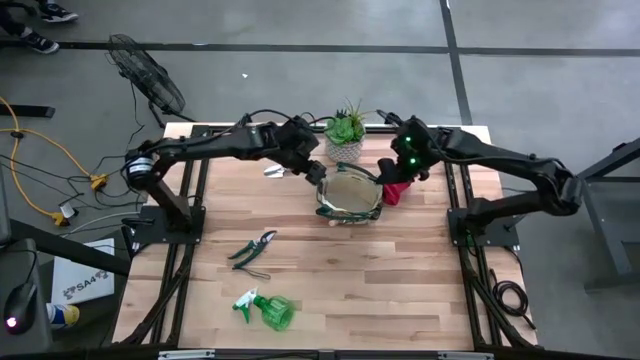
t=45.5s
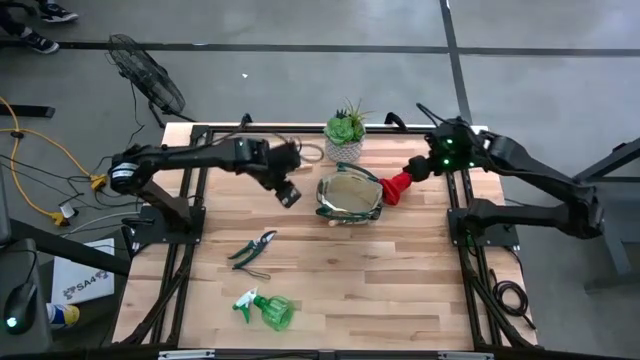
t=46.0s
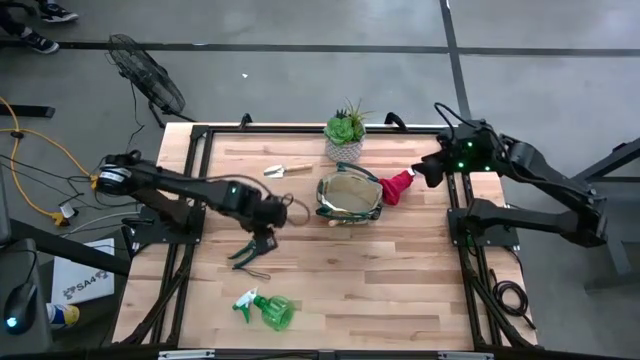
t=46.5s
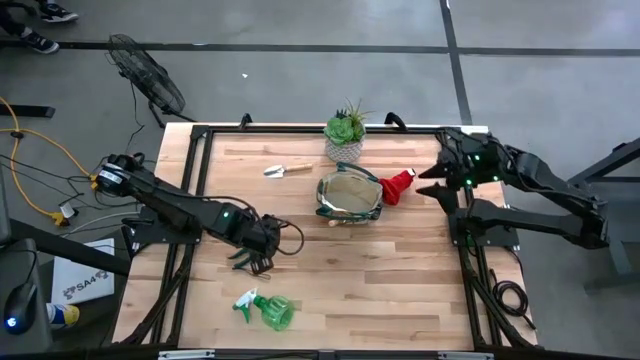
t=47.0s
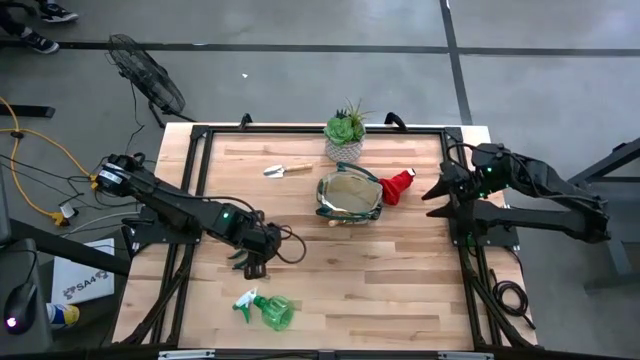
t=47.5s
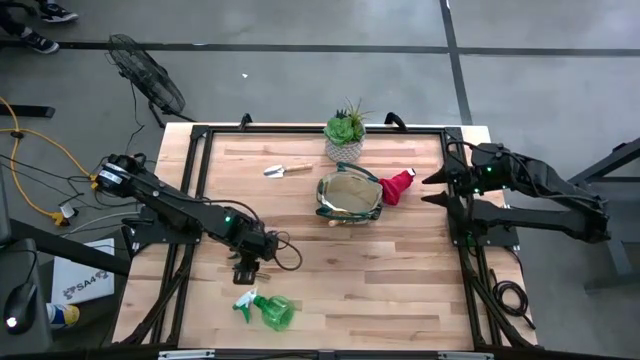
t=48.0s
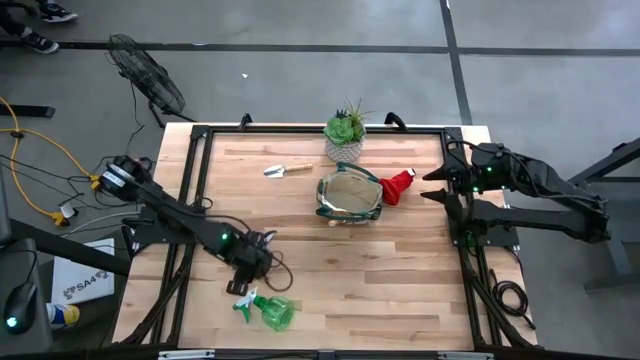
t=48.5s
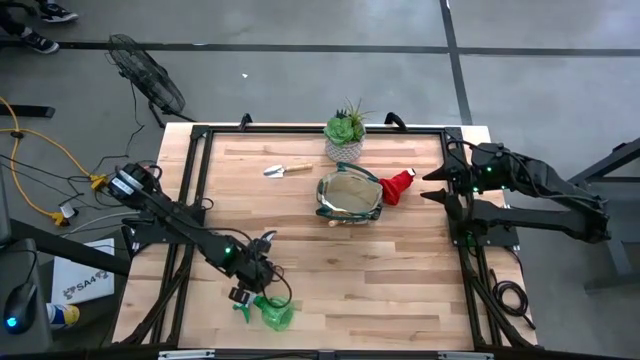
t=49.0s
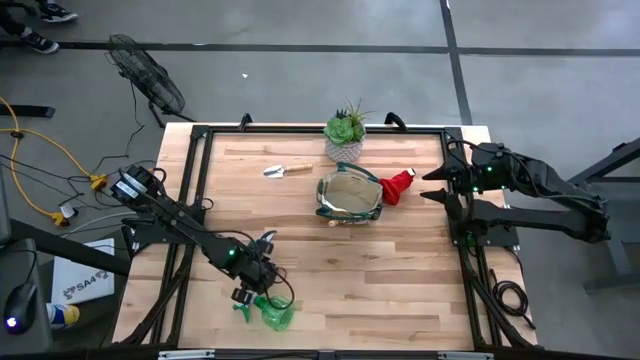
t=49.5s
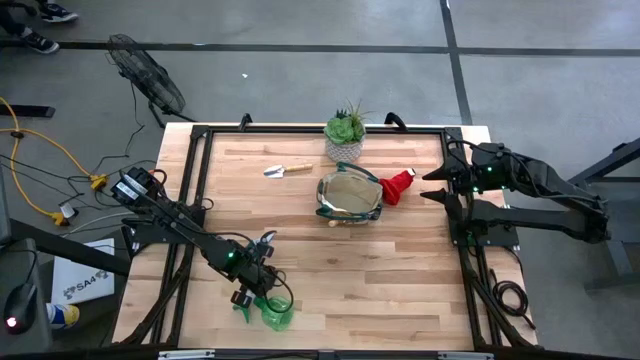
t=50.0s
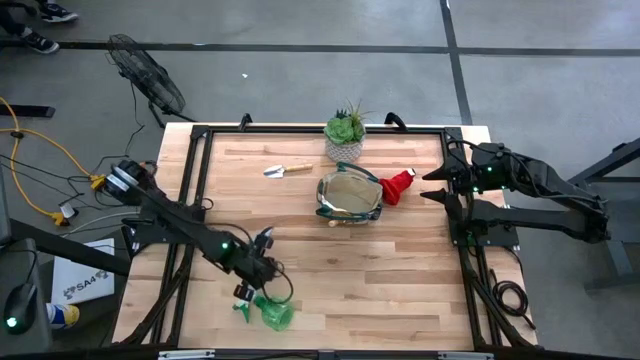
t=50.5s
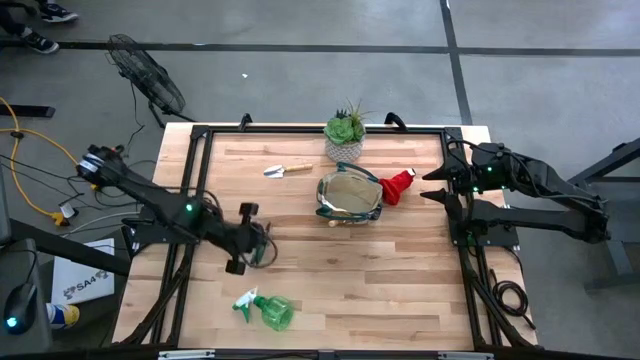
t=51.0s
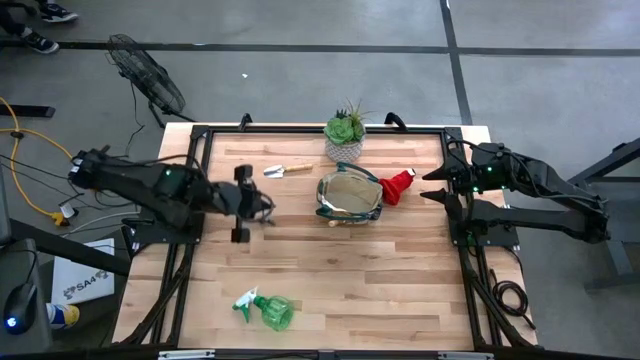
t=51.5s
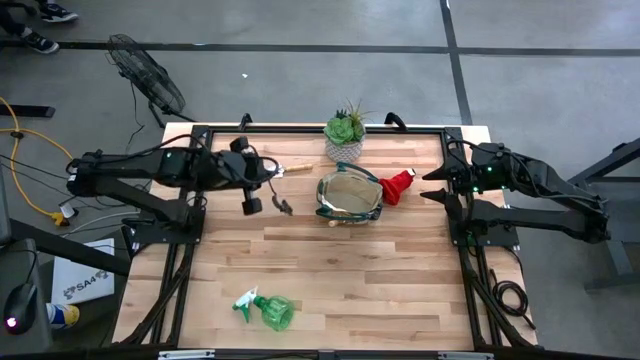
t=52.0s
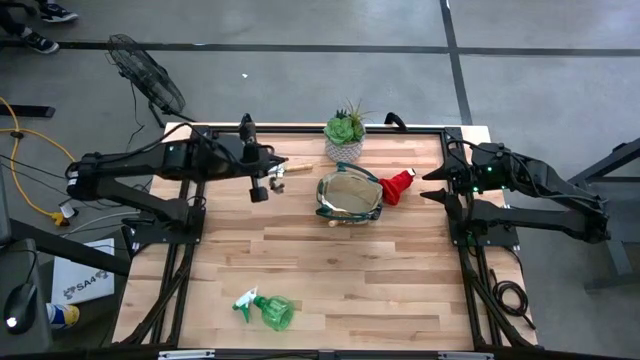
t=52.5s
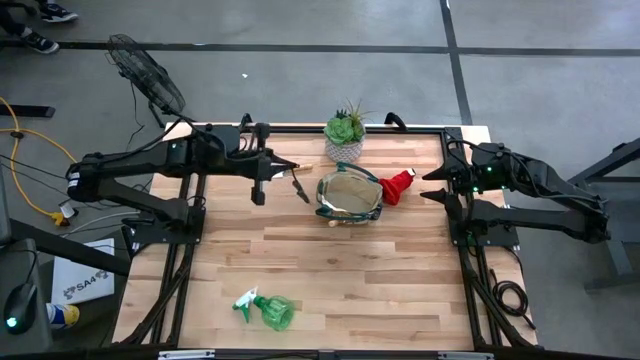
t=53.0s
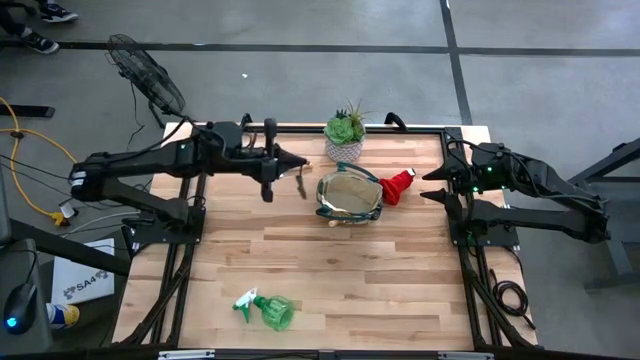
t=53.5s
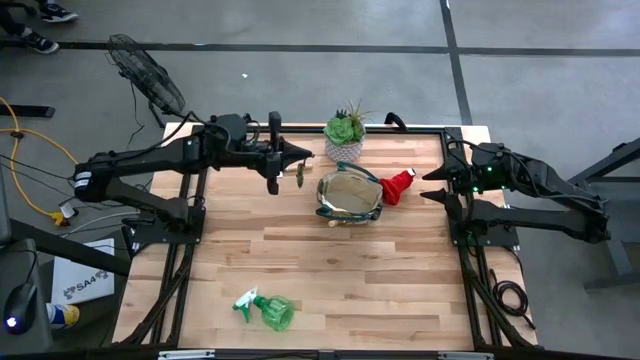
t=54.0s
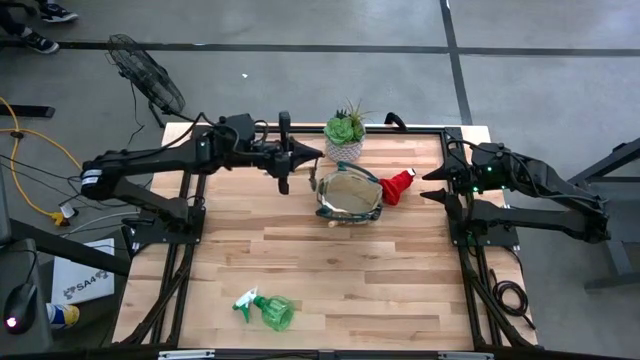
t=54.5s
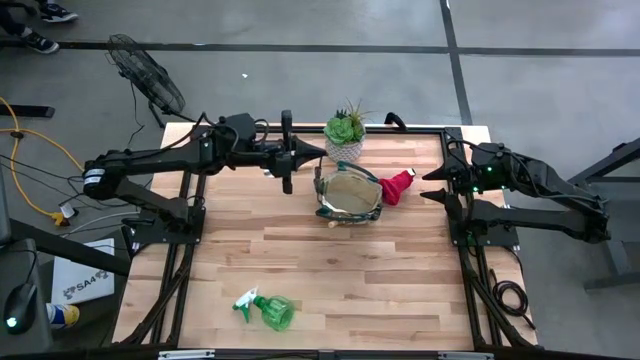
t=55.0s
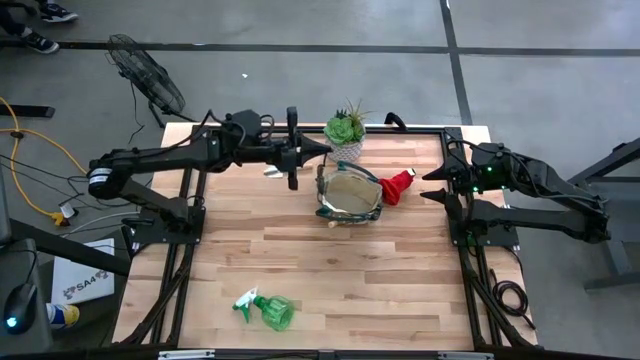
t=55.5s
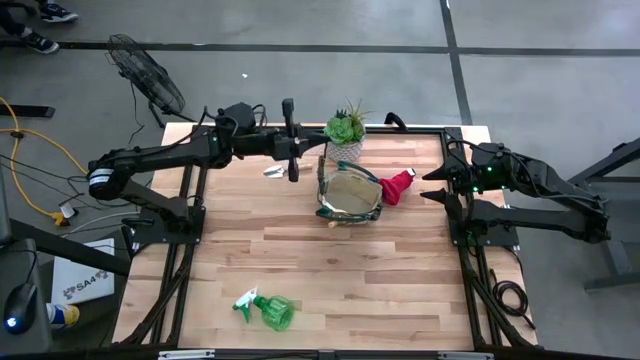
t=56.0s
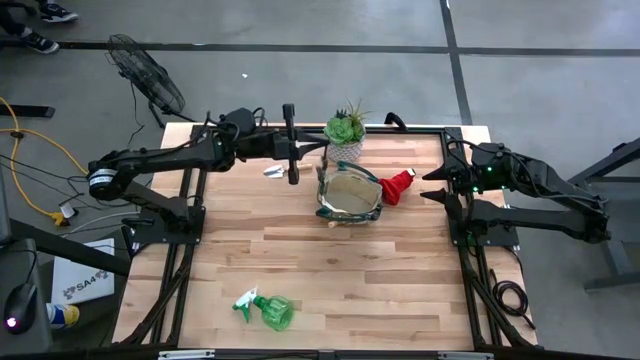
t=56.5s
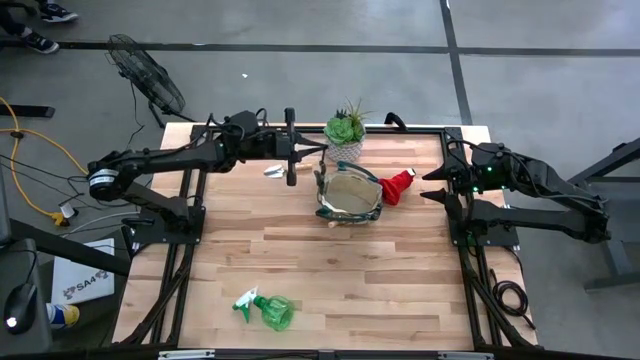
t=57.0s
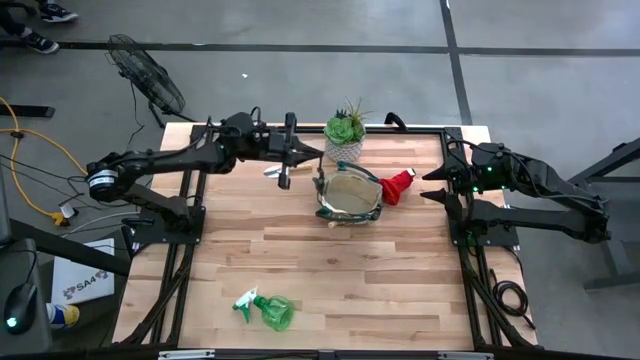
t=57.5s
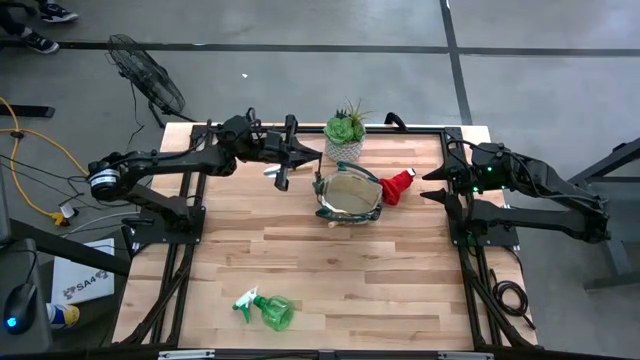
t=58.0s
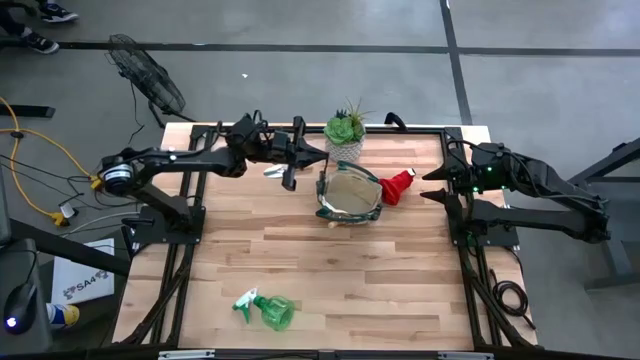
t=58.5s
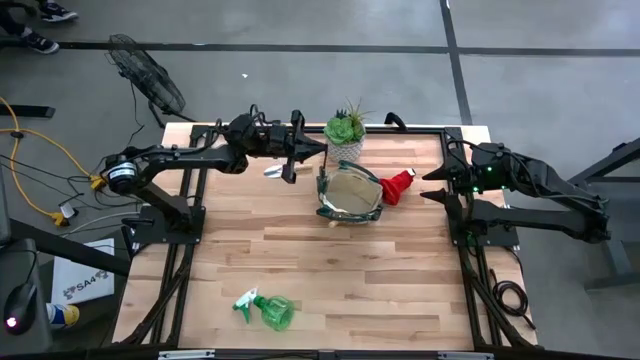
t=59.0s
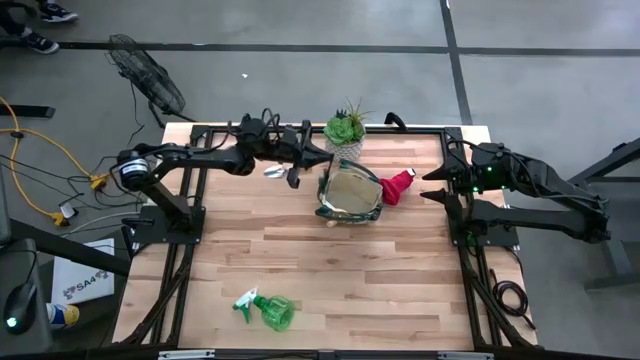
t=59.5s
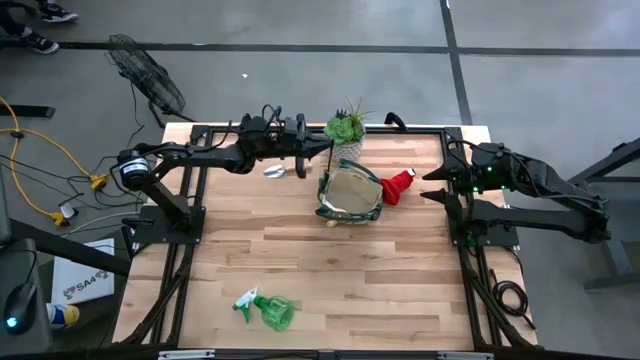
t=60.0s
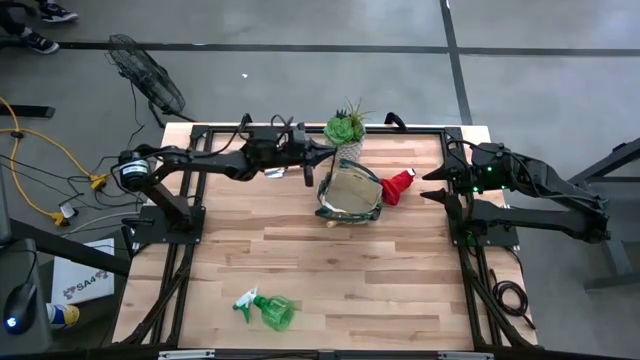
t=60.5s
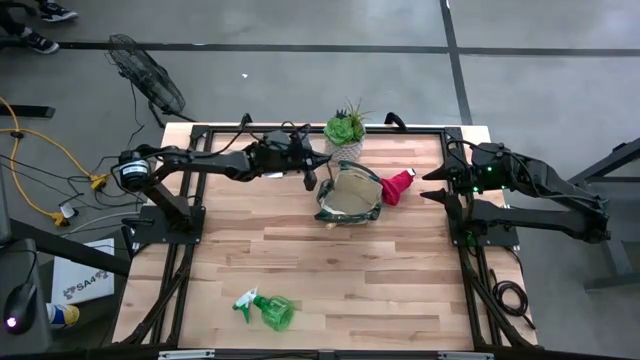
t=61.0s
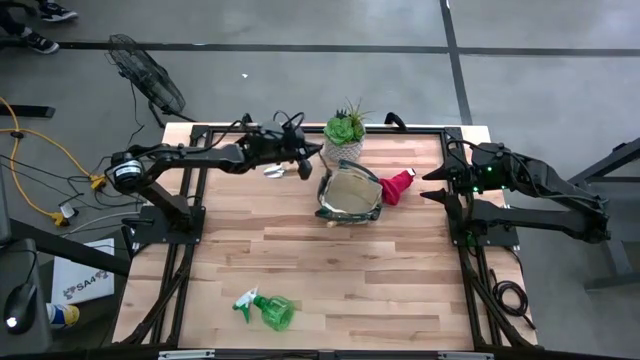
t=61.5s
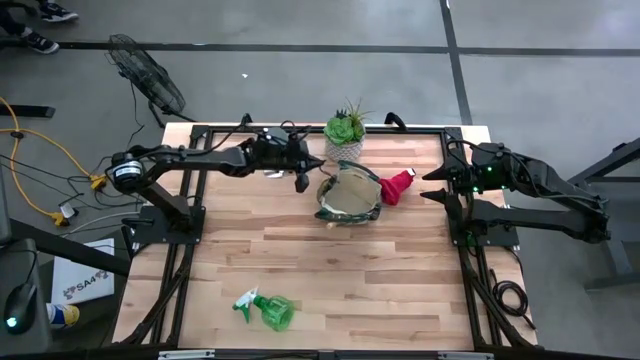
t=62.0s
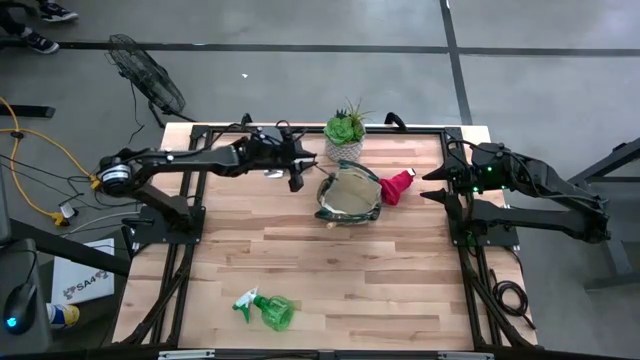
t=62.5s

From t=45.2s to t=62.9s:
Task: Pick & Place Garden tools in Gardening bag
Put the green shear scissors into the brown gardening bag

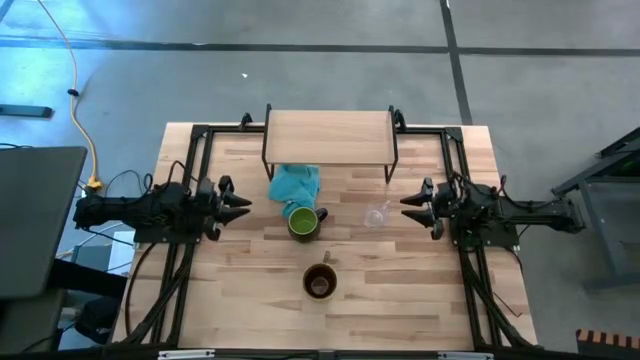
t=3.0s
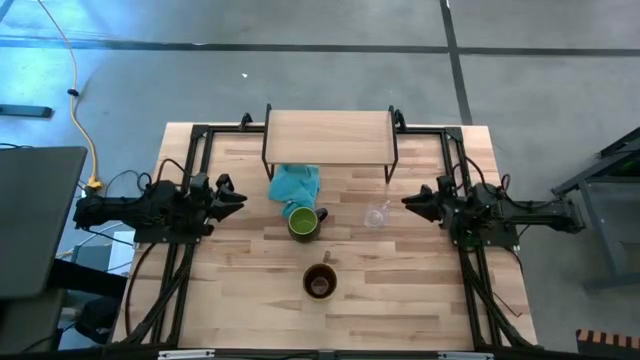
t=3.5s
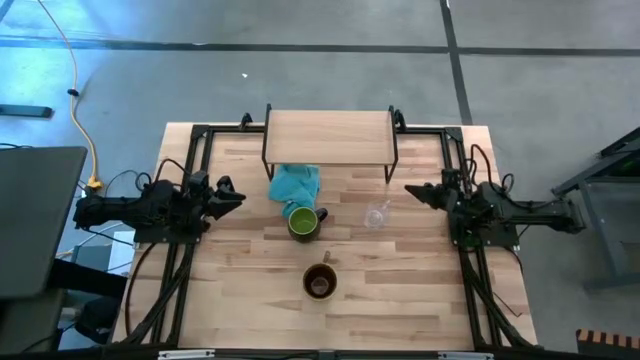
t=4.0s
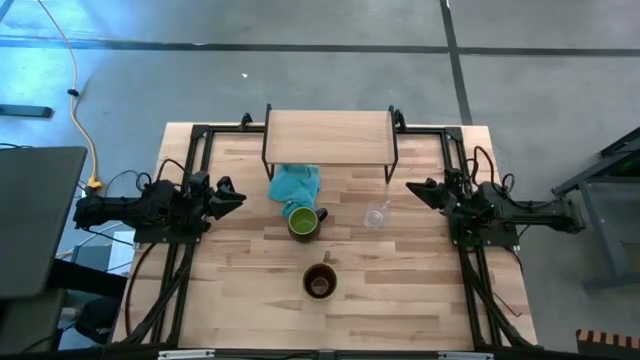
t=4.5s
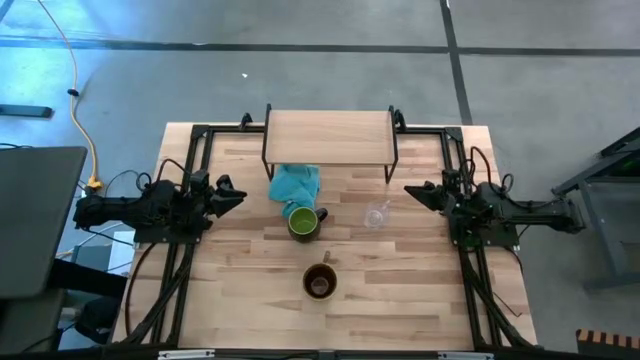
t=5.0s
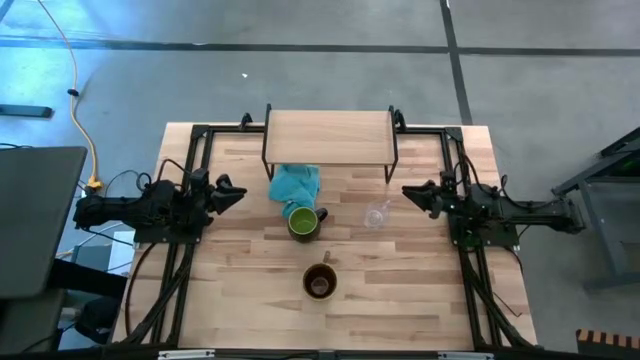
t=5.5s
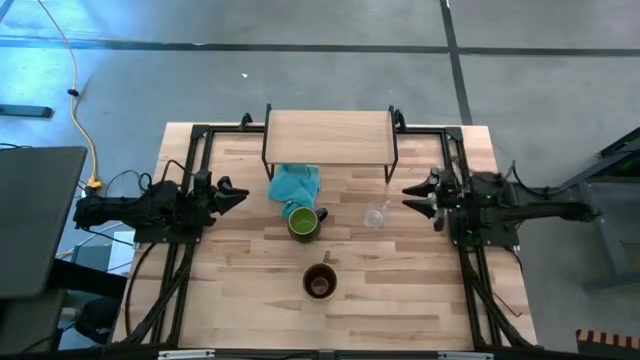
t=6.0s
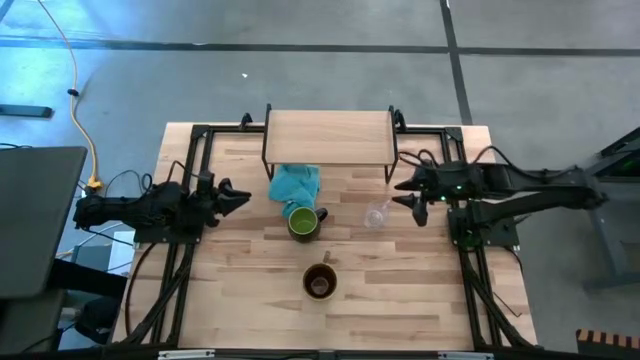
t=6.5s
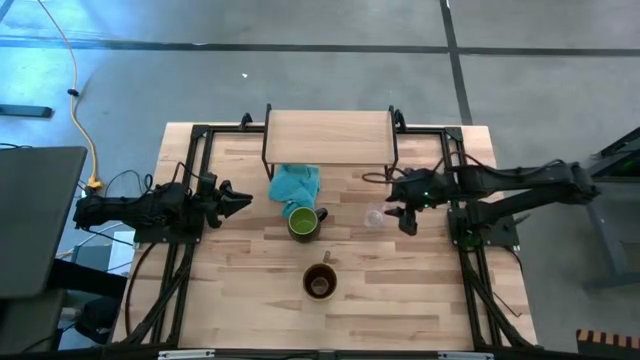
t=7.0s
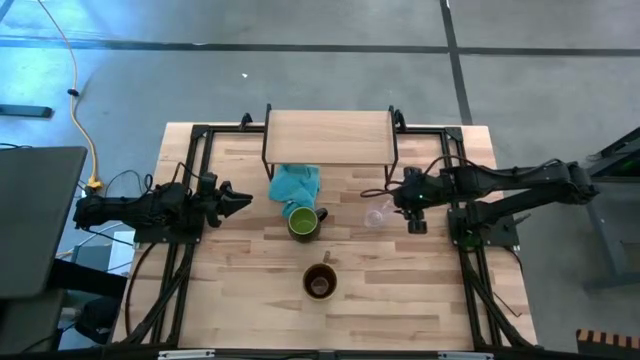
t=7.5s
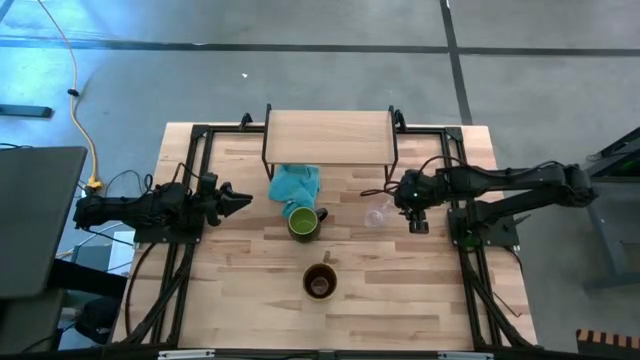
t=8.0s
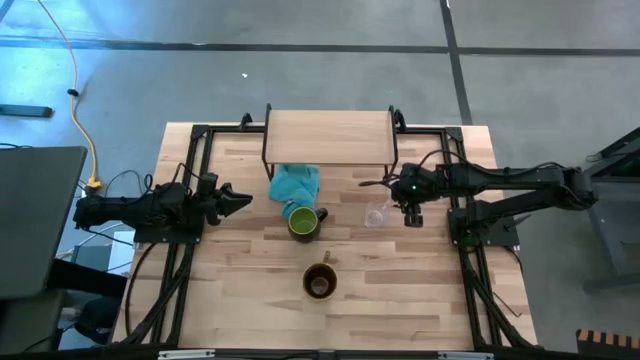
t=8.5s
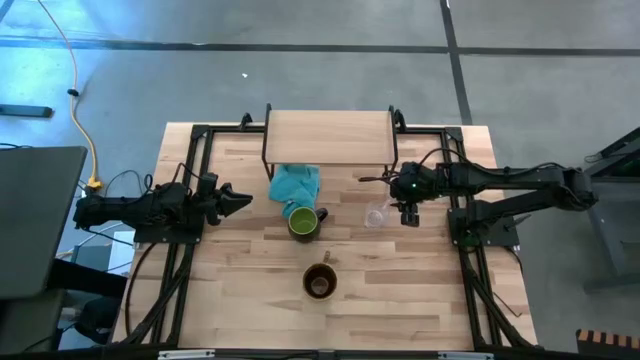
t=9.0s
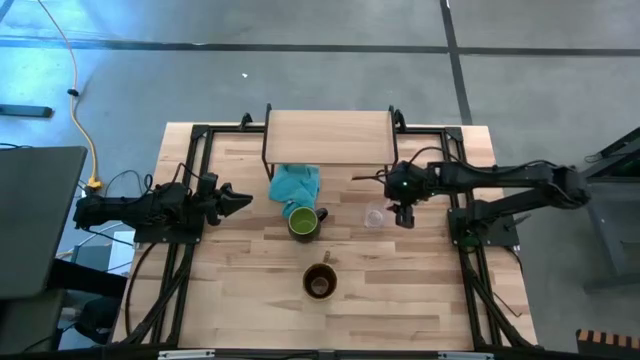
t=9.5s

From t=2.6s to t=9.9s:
Task: Stack small to large cups/mugs on shelf
Put the transparent mug on the shelf
